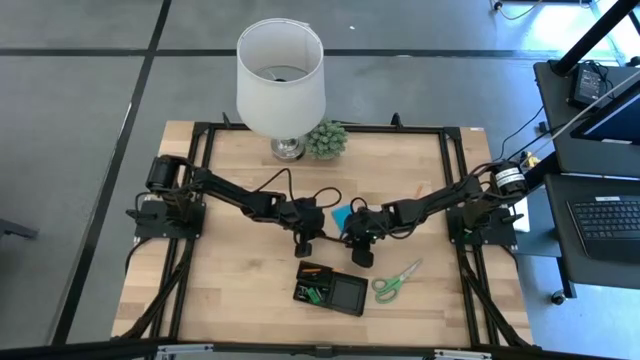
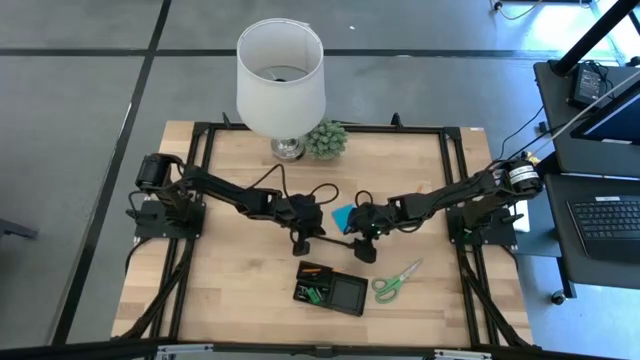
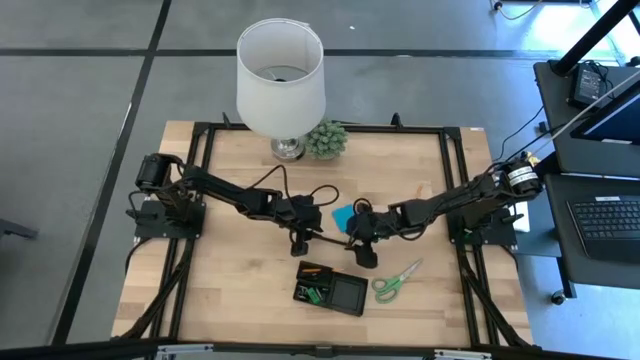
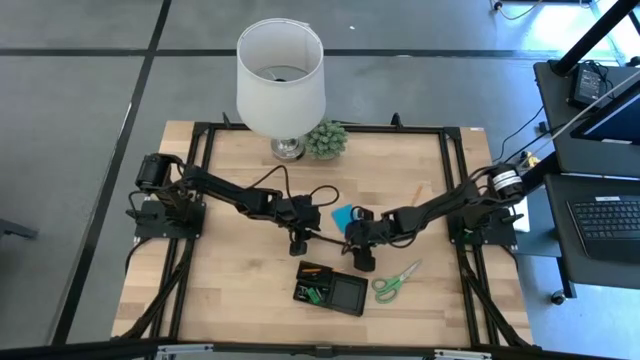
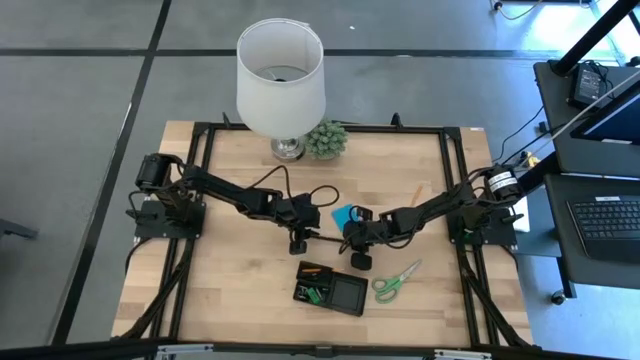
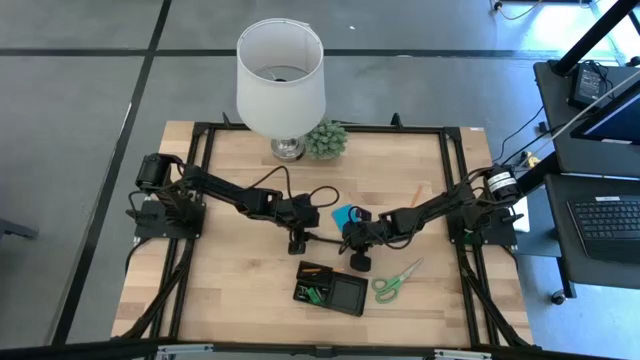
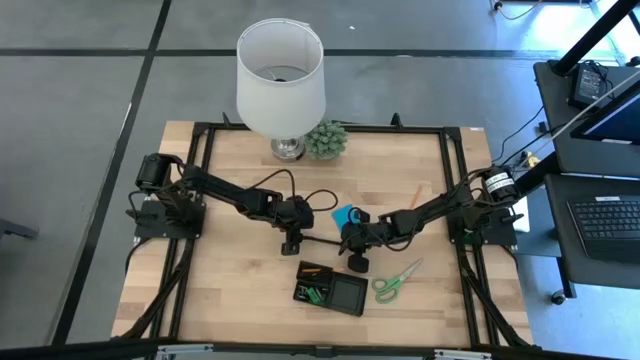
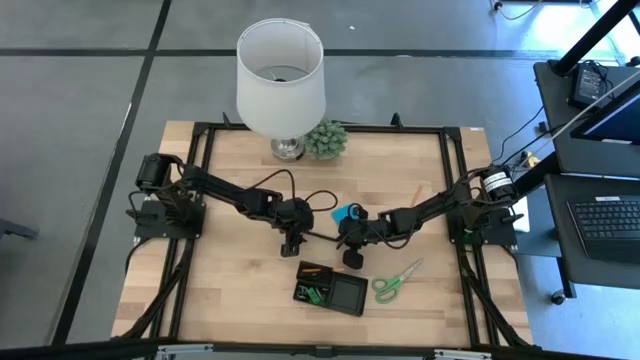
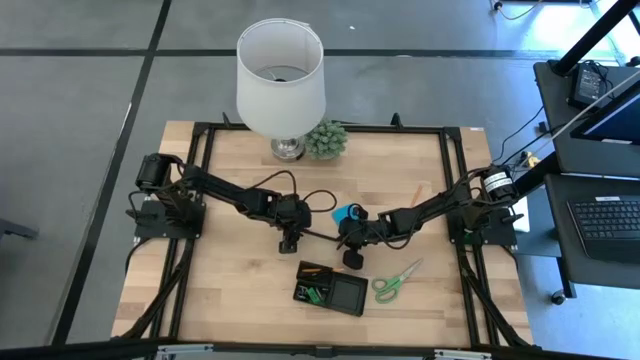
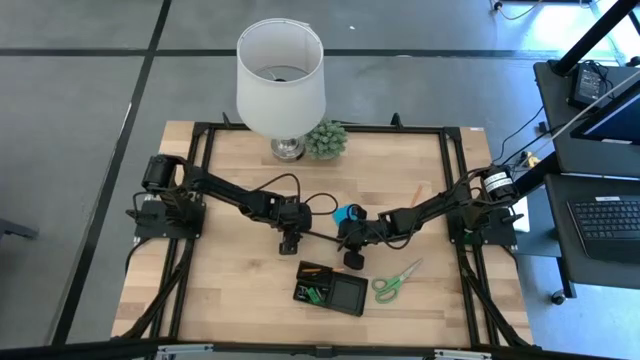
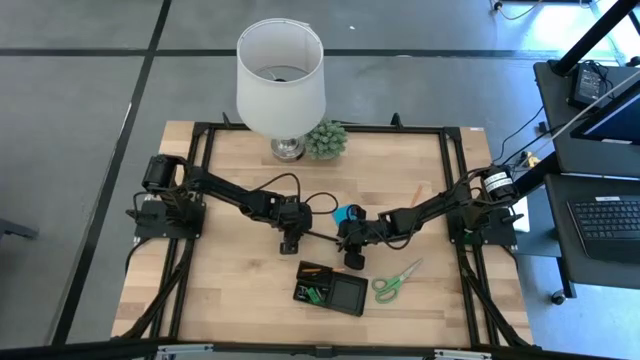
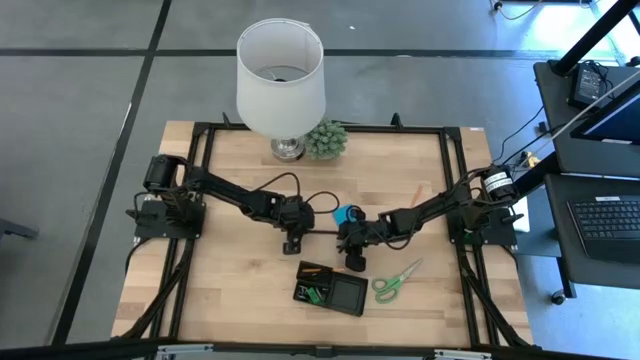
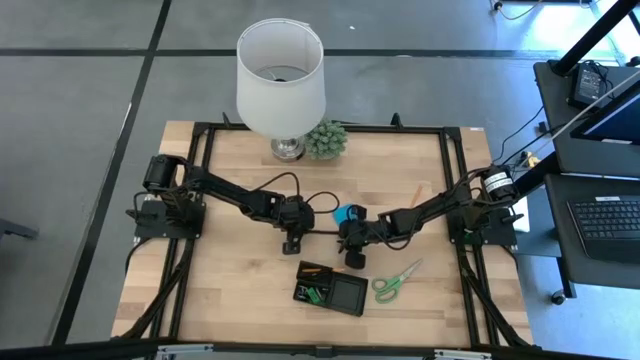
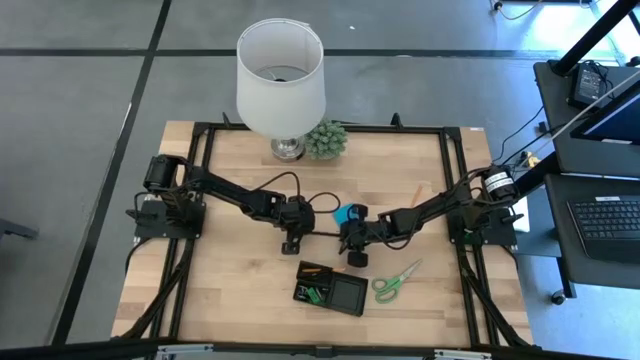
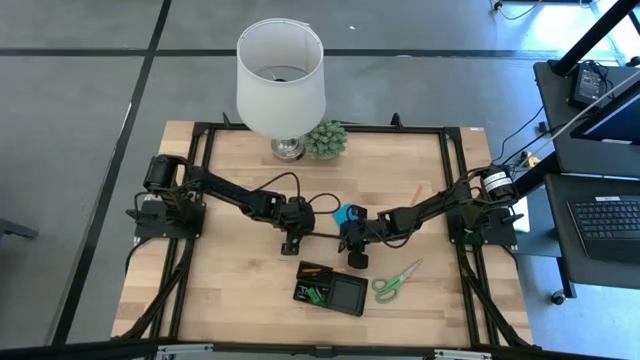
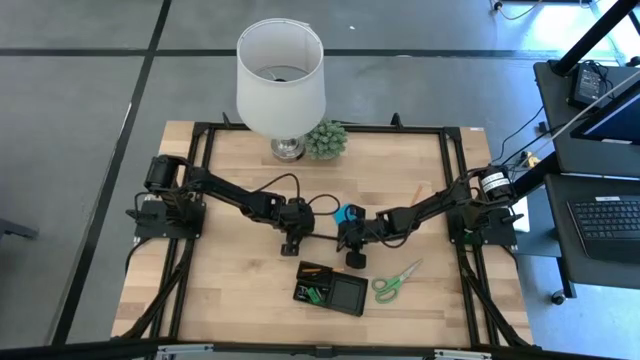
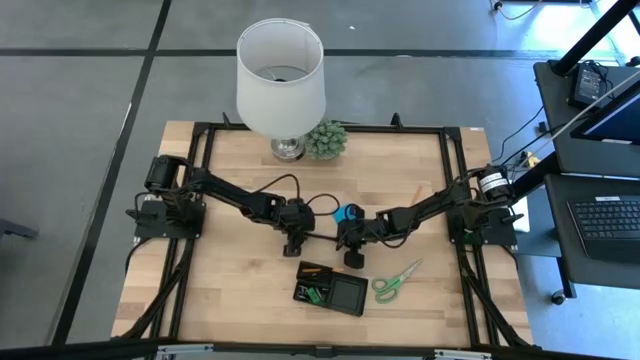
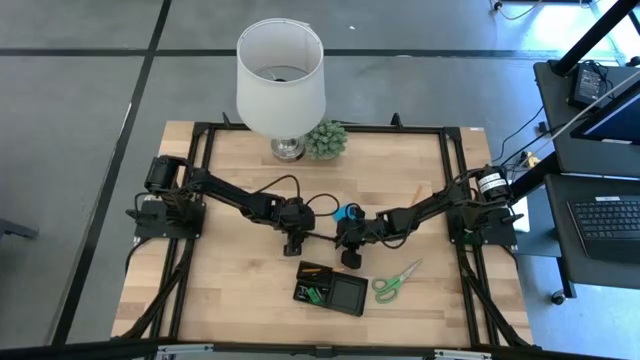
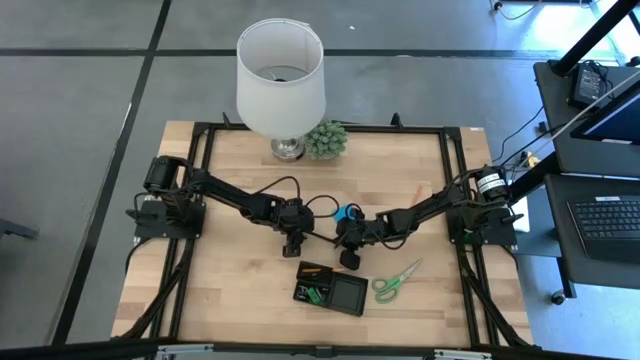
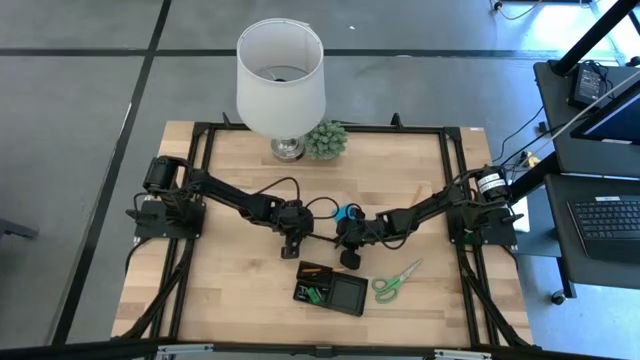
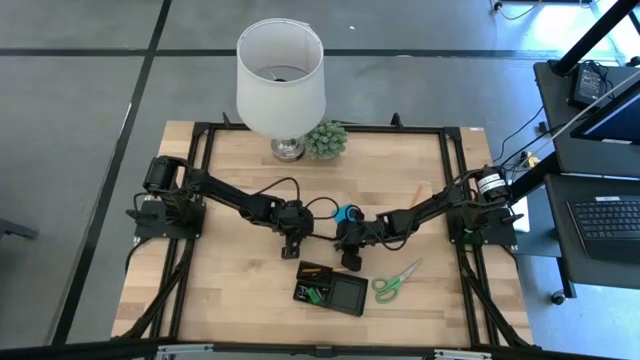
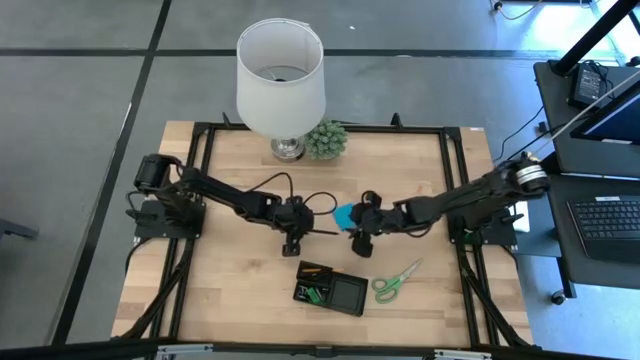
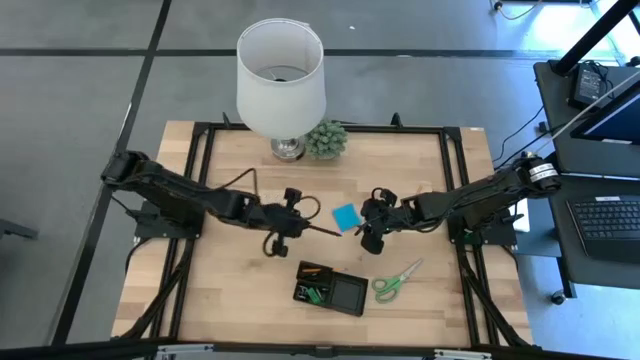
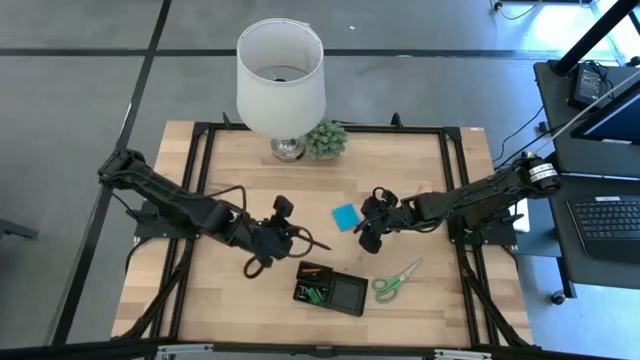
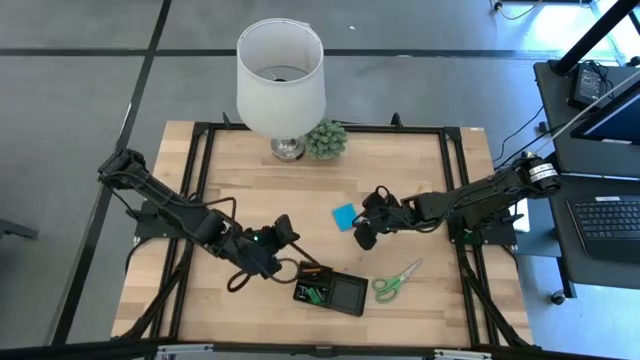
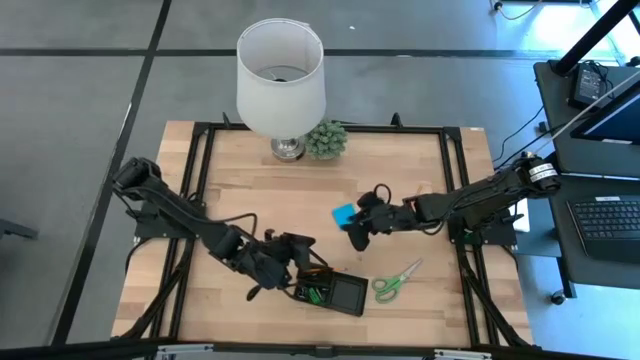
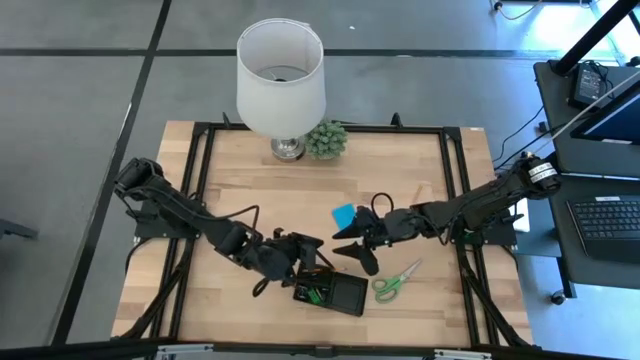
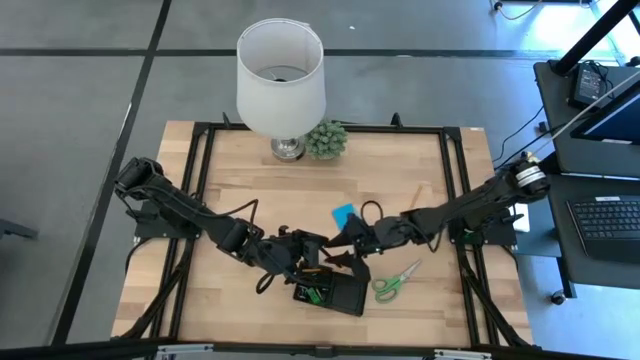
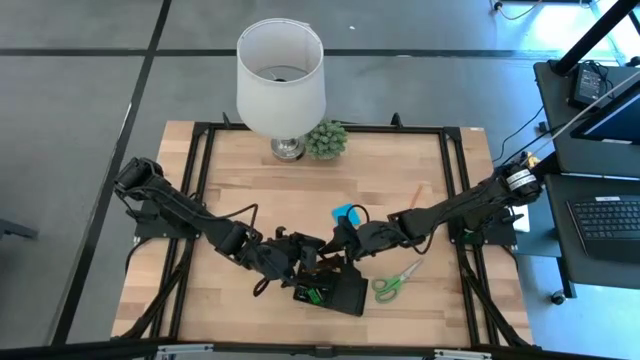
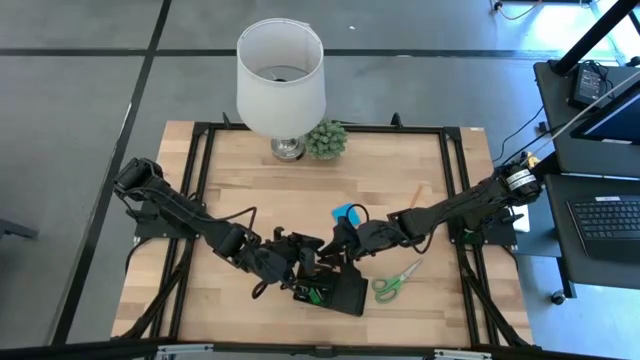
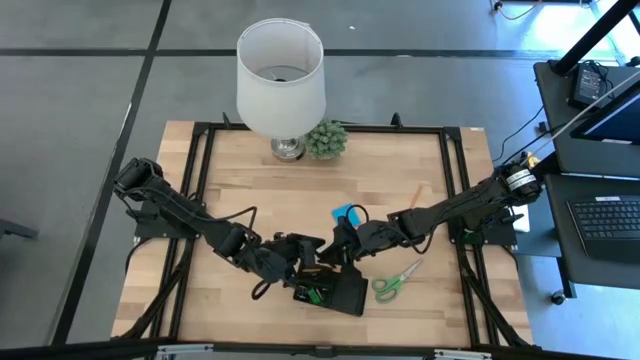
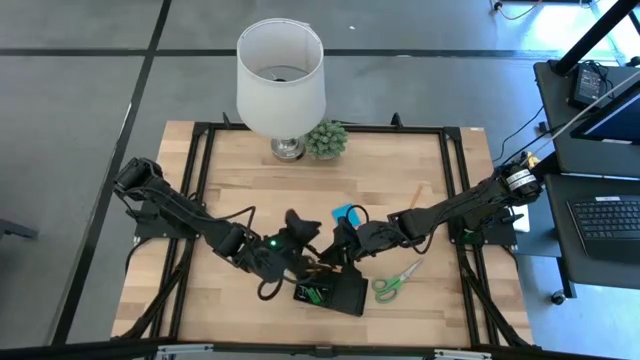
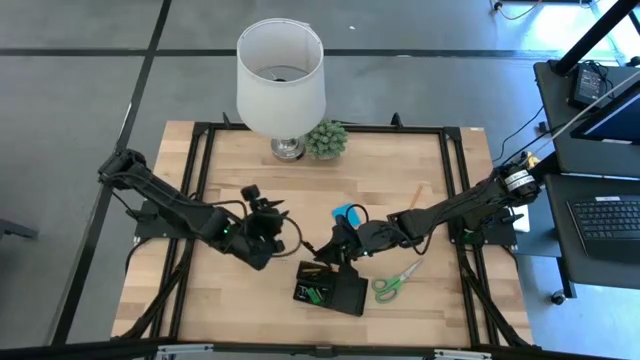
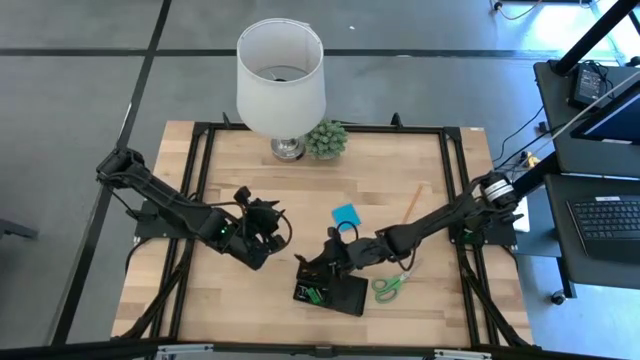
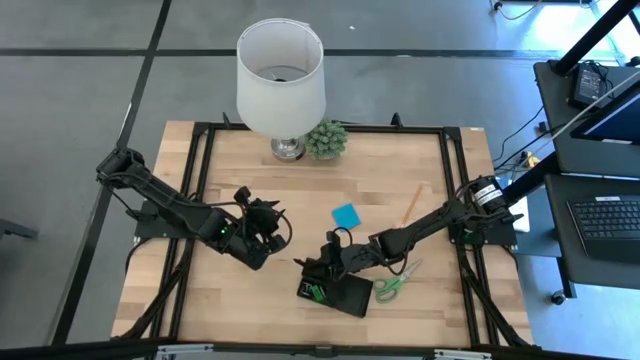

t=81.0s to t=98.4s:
Task: Pick and place office supplies into organizer
Put the black pen into the desk organizer

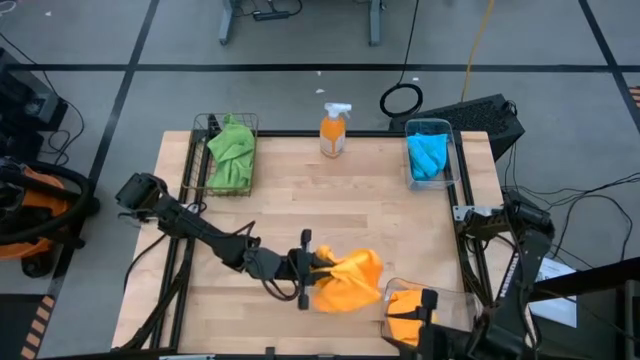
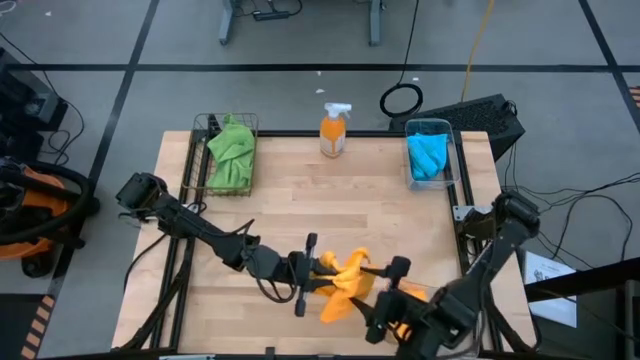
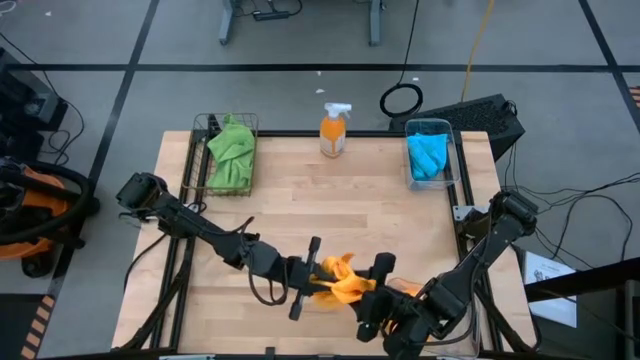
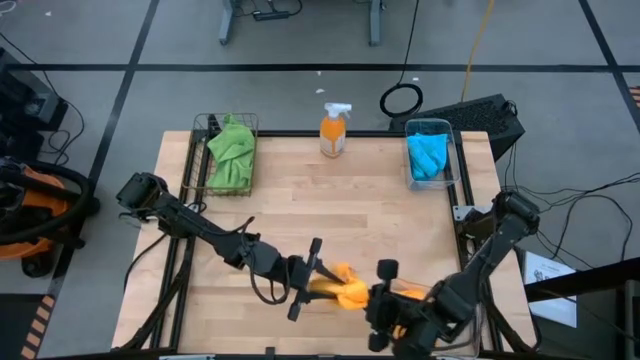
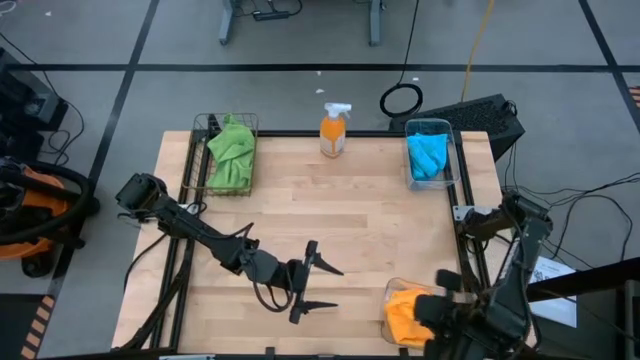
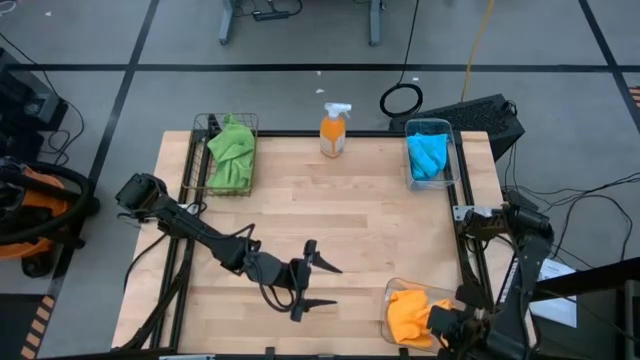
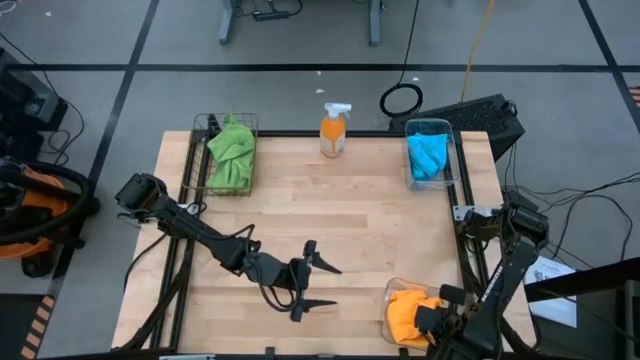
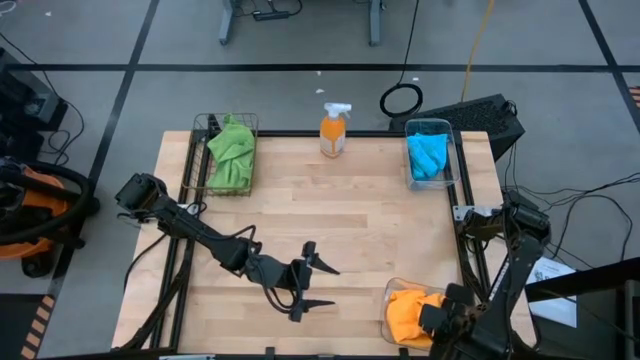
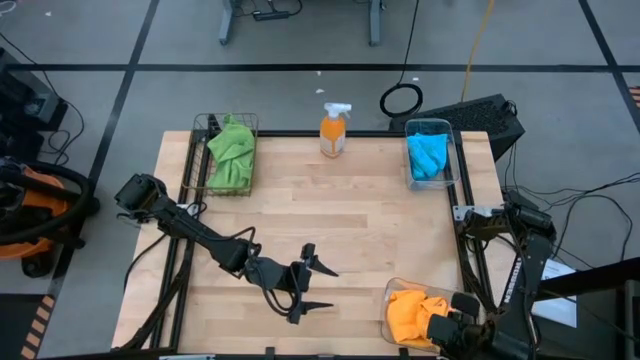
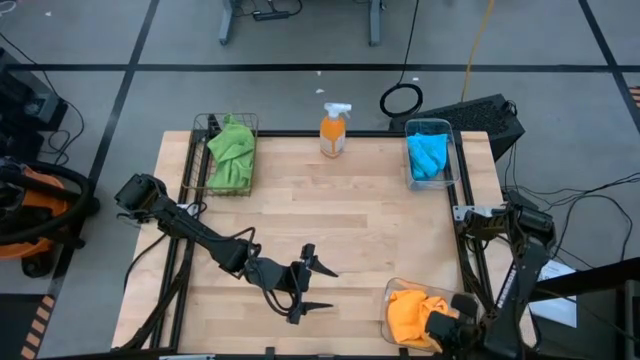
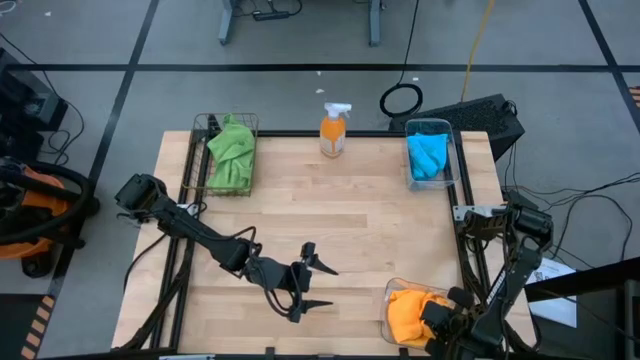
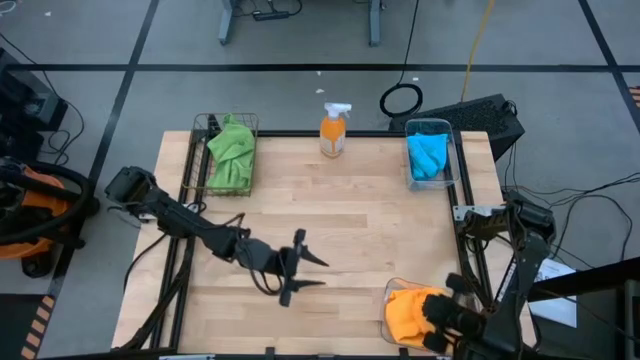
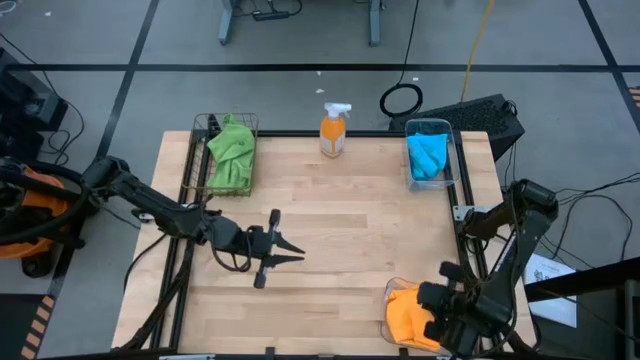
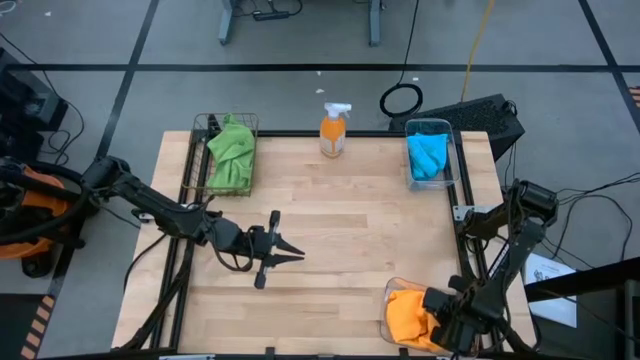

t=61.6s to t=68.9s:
Task: Sort microfiber towel by color & place in baskets
Put the yellow microfiber towel into the bottom transparent bin
